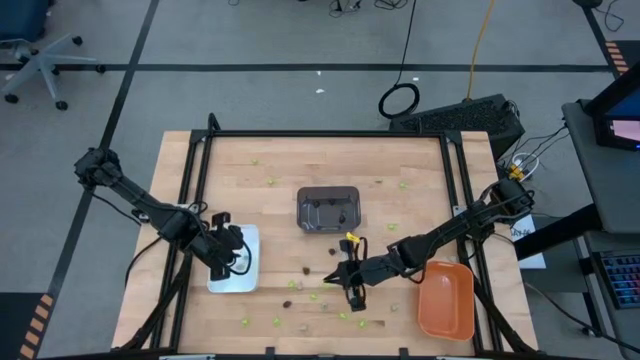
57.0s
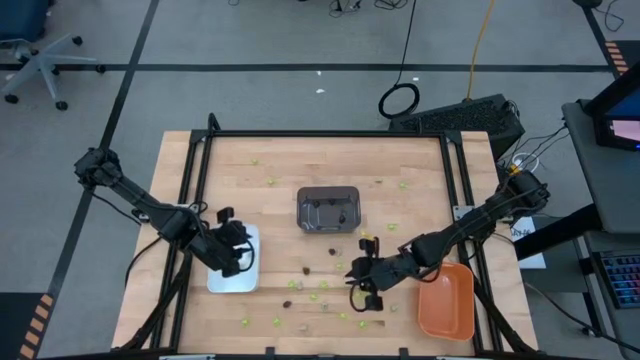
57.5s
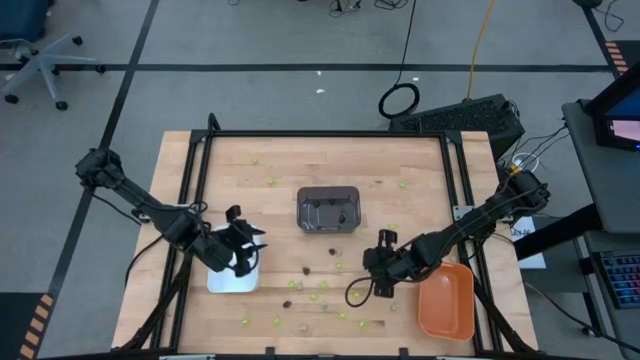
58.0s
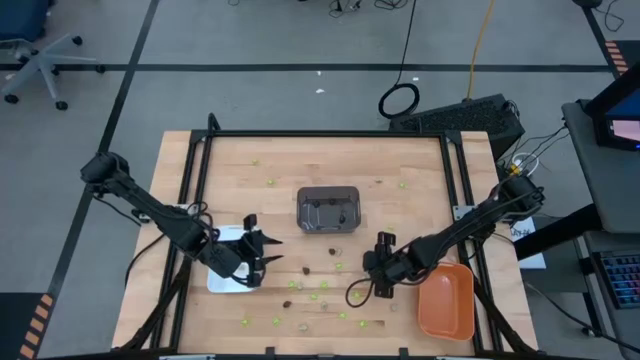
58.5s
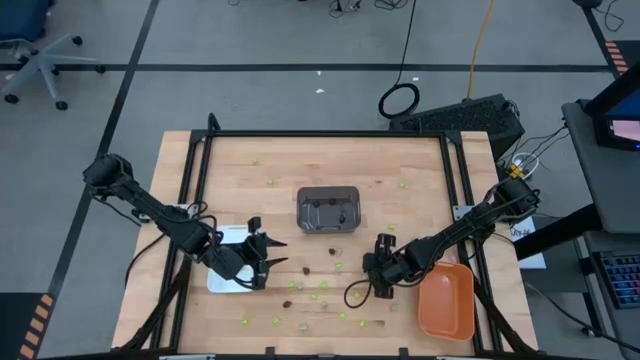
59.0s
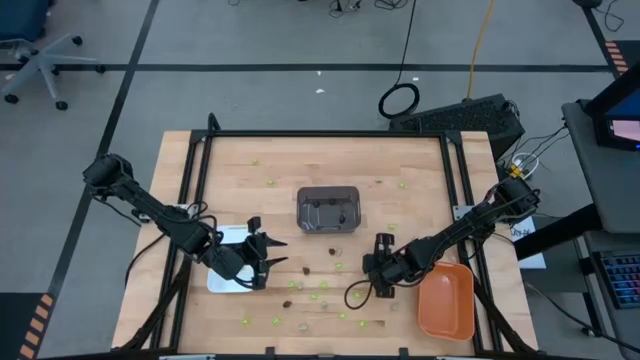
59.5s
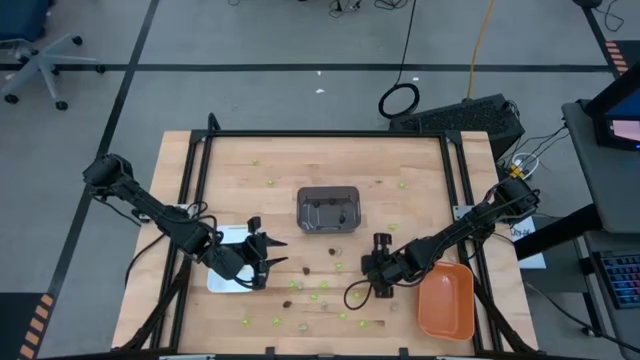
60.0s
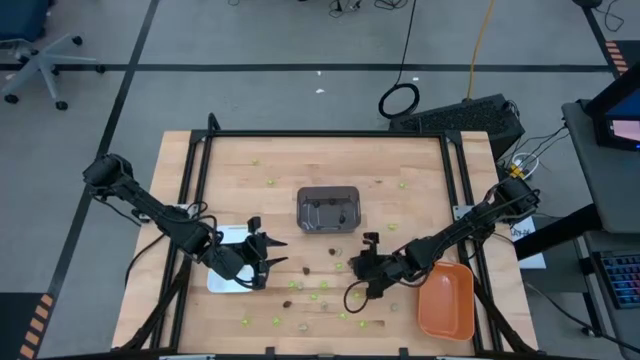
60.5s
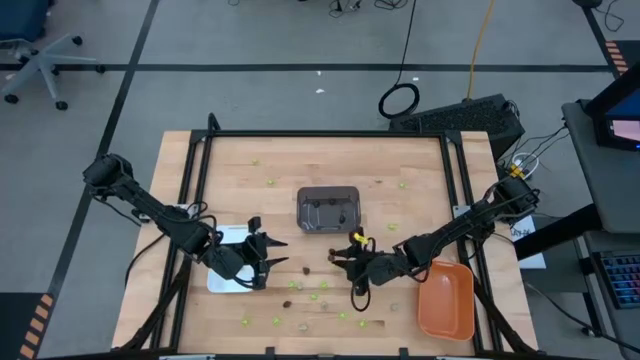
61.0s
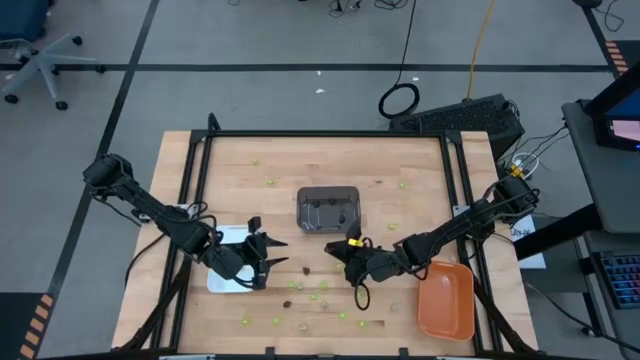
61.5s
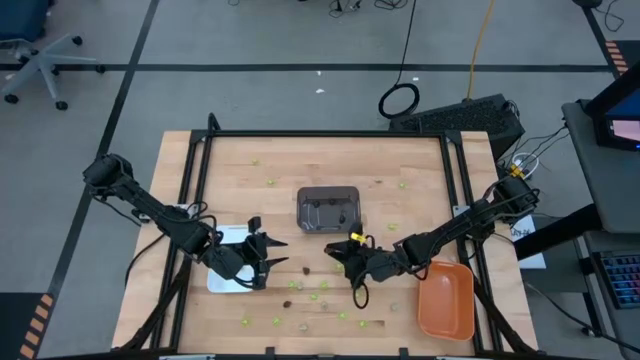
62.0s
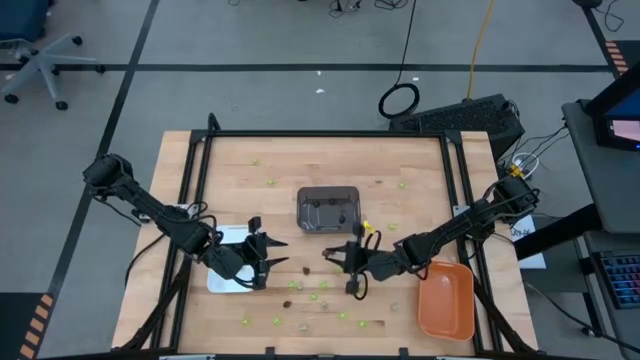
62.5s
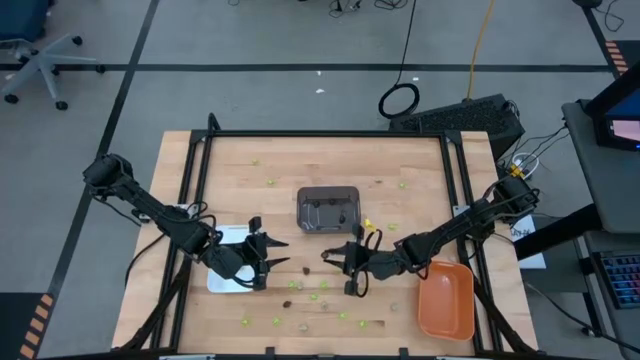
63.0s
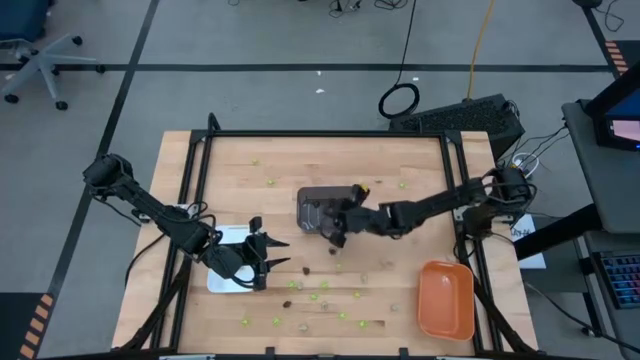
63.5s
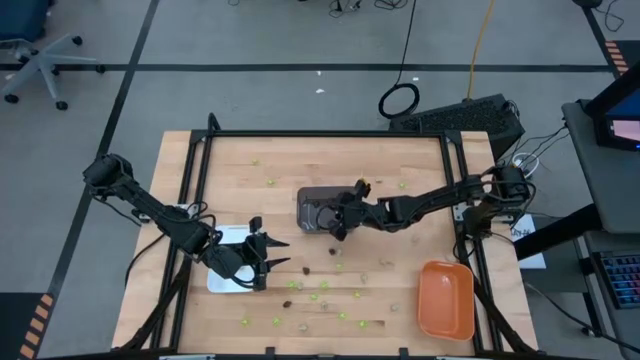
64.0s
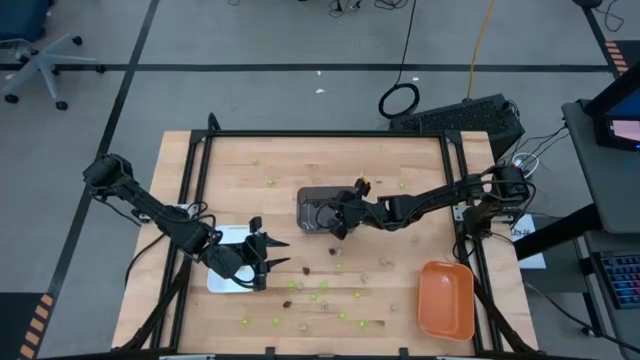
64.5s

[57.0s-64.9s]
Task: Sort Halloween decoration
Put the black skull toy into the black bin

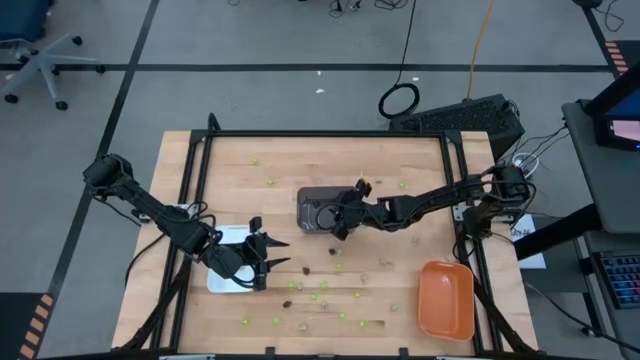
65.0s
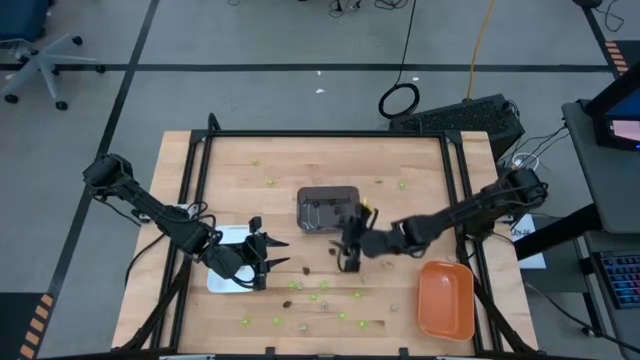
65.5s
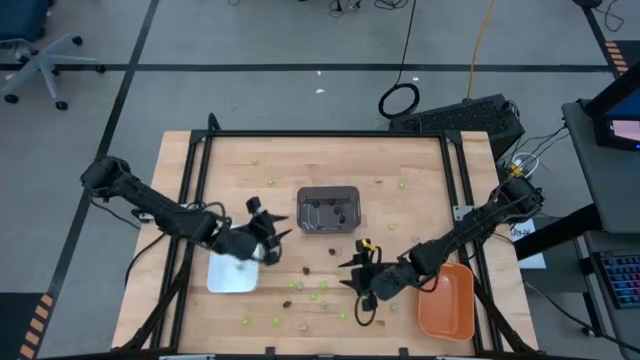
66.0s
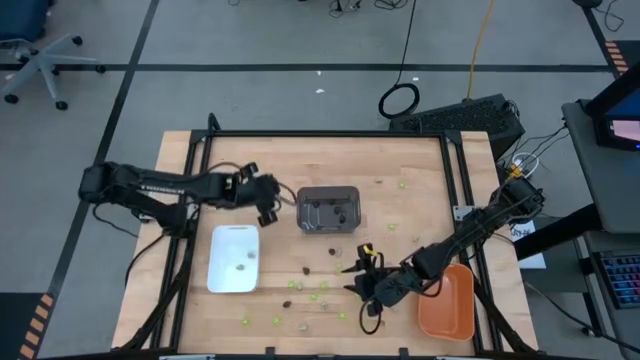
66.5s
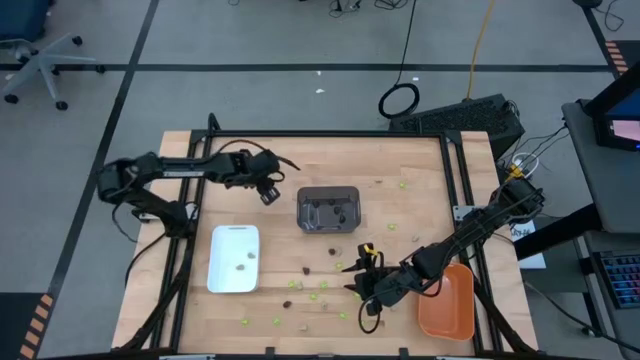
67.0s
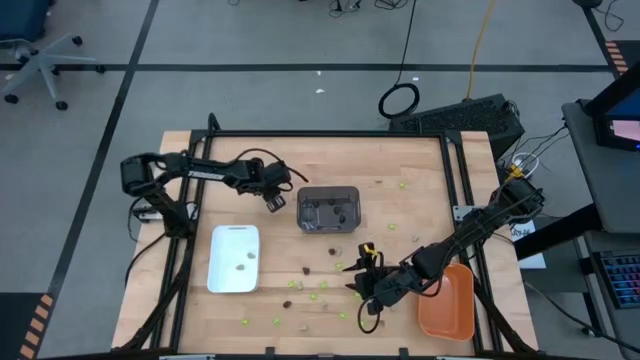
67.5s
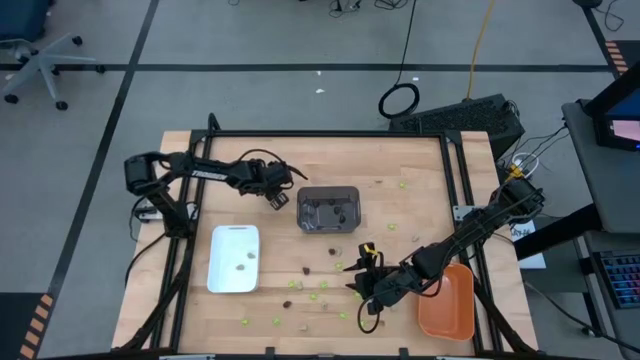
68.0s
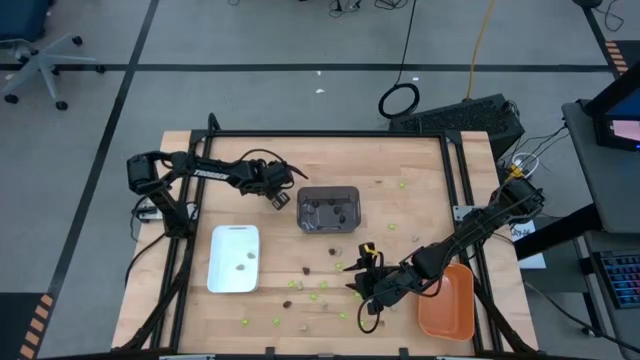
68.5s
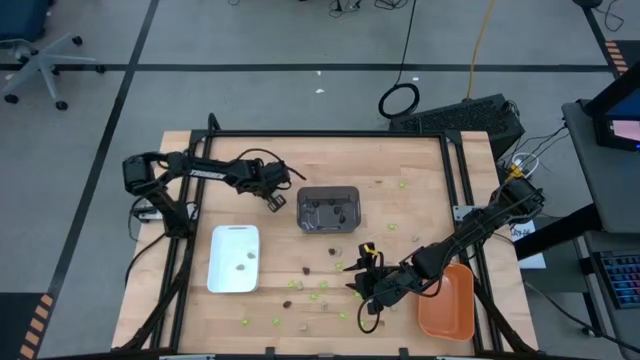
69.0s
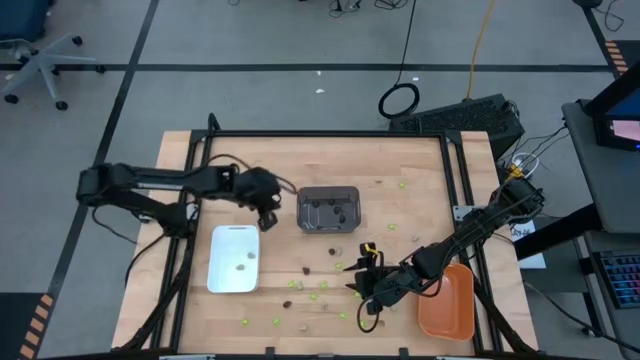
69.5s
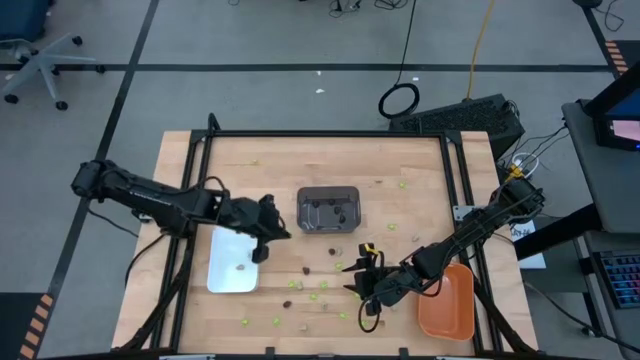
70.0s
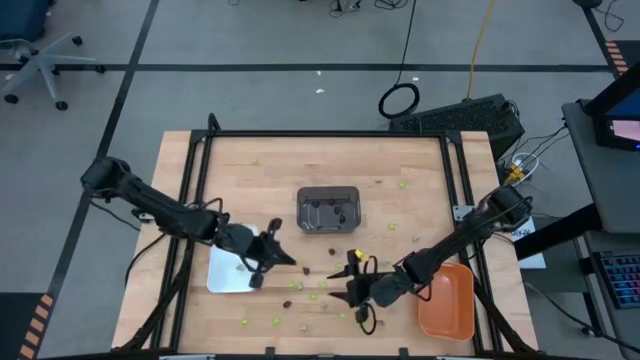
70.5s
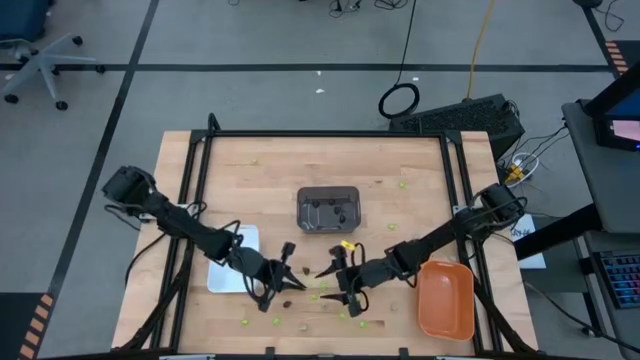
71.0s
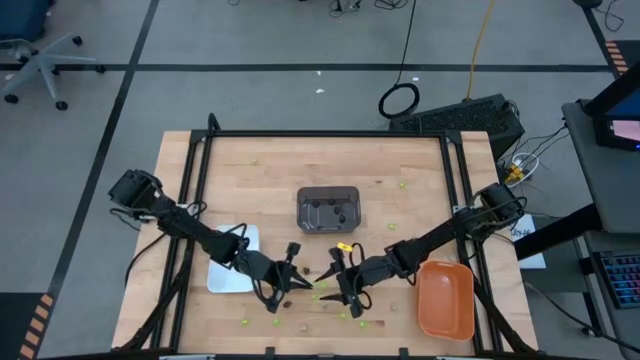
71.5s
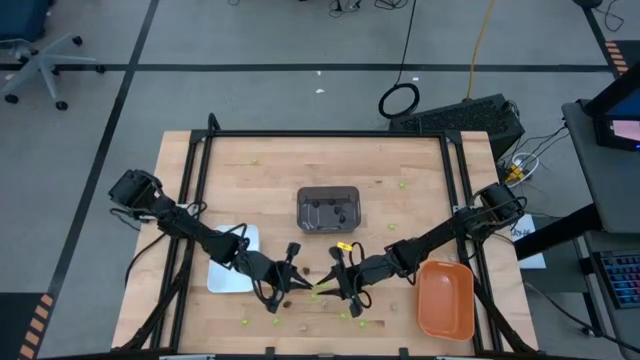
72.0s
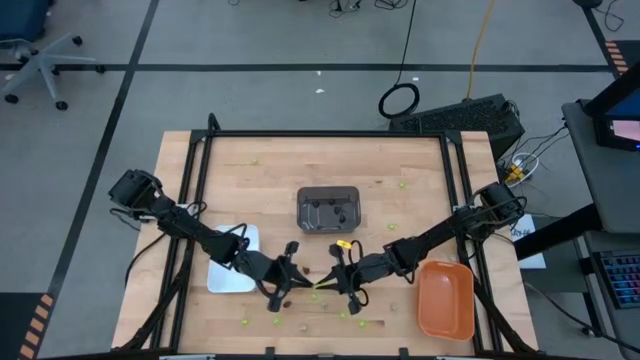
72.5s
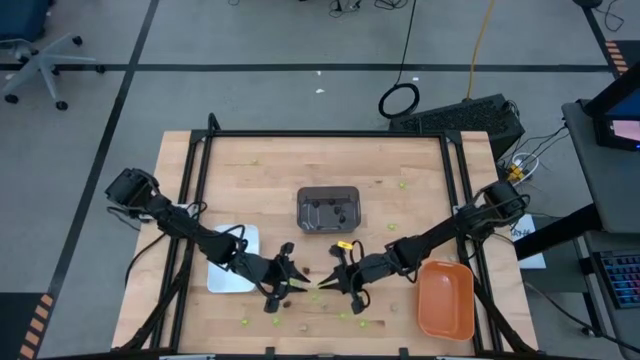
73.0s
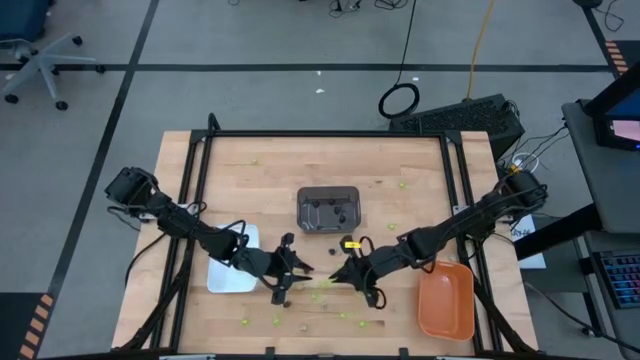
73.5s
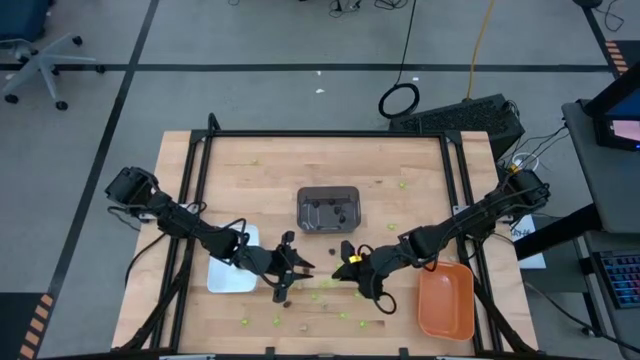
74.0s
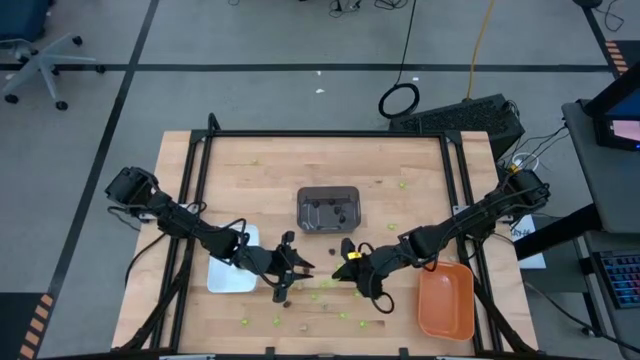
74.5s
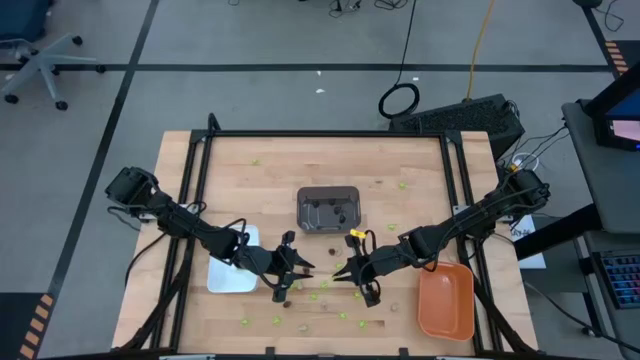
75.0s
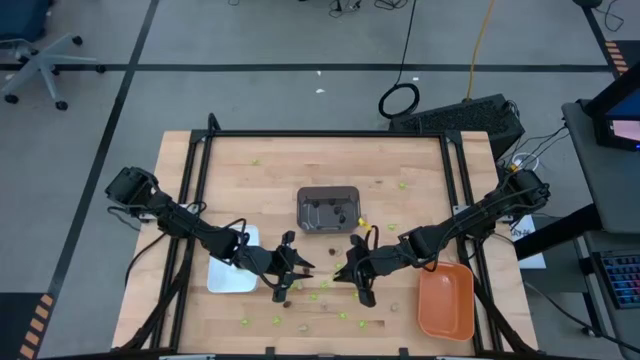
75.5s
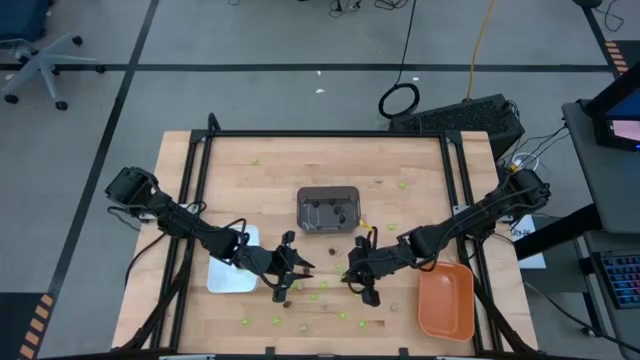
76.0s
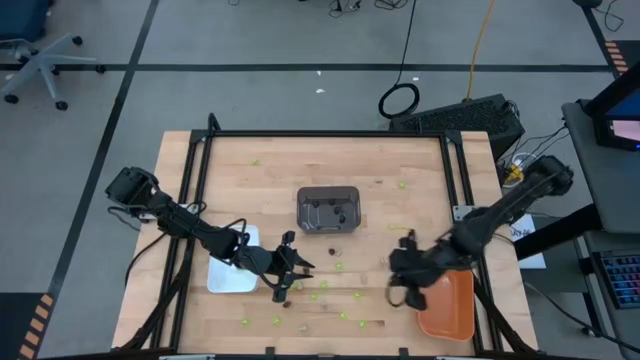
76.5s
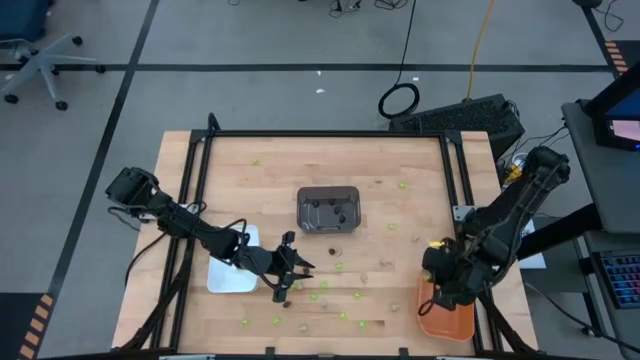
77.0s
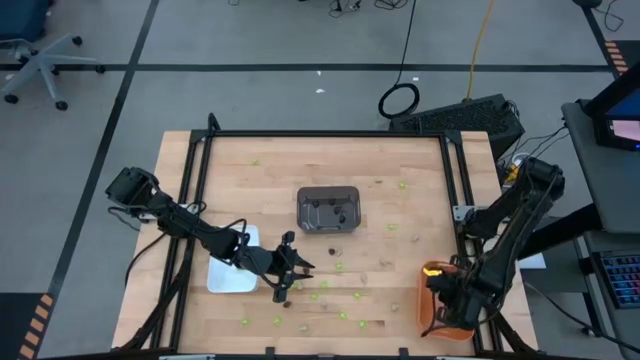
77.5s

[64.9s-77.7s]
Put the green spider toy into the orange bin
